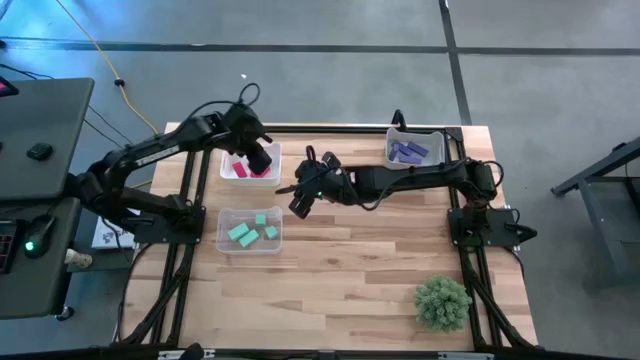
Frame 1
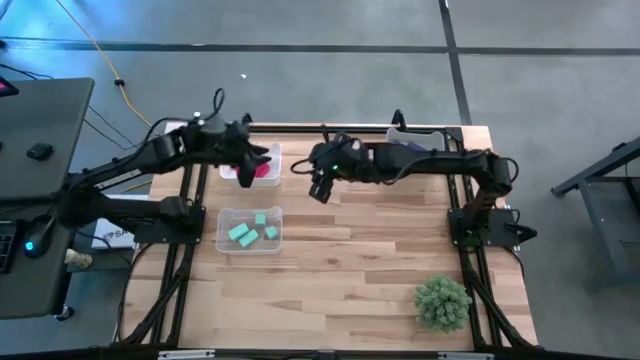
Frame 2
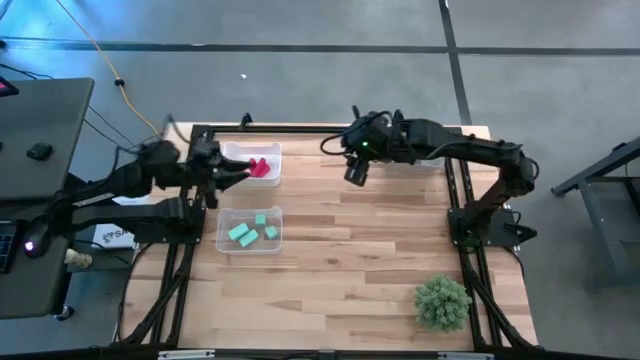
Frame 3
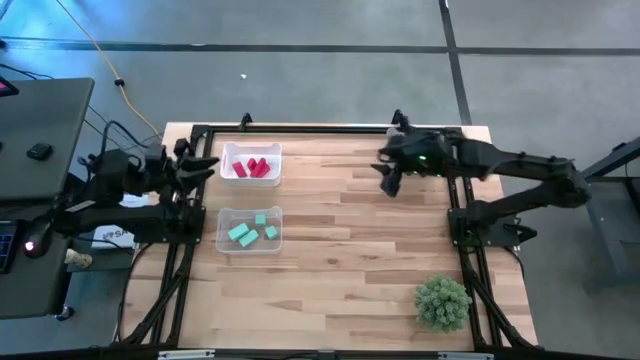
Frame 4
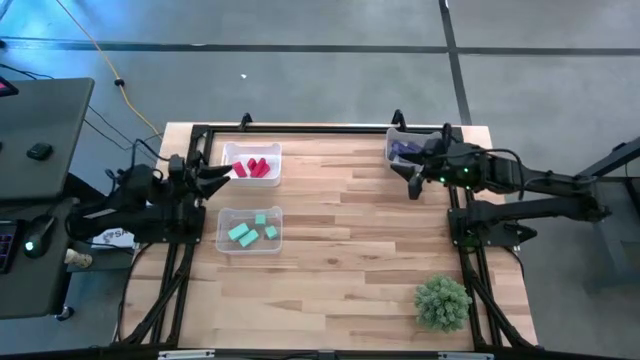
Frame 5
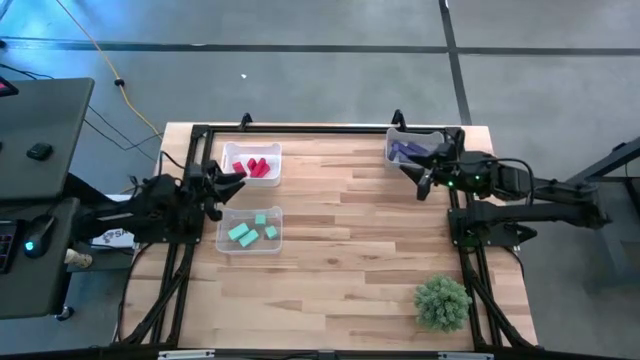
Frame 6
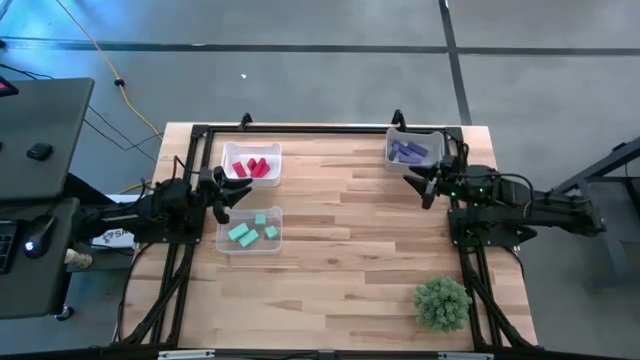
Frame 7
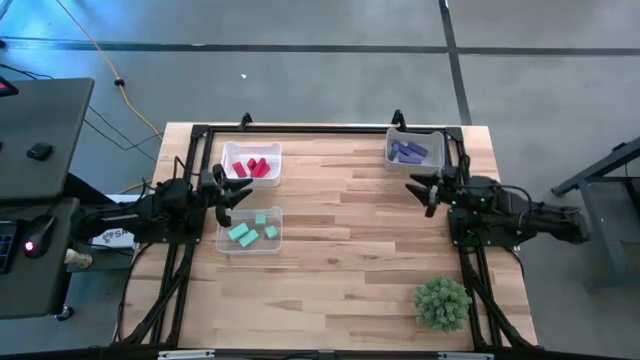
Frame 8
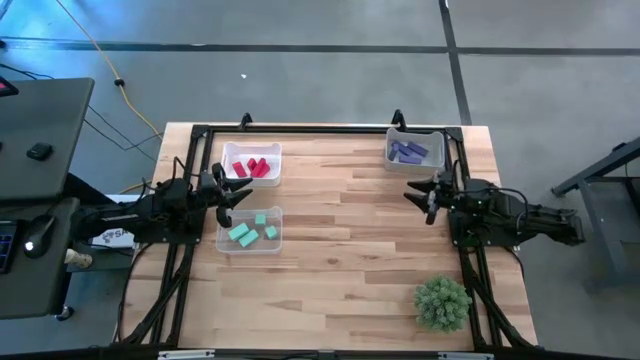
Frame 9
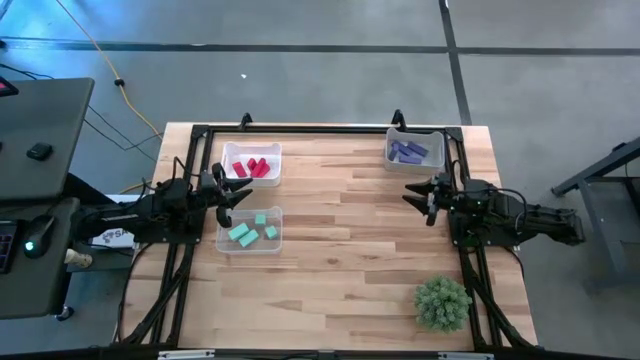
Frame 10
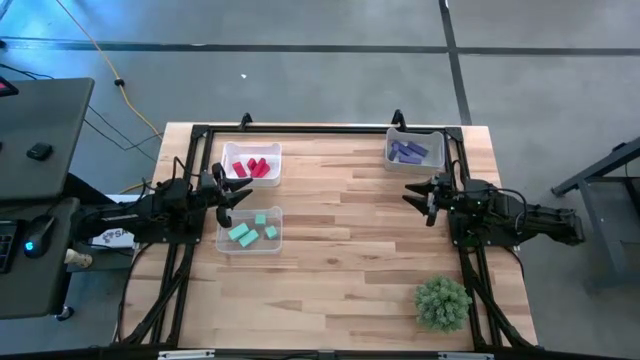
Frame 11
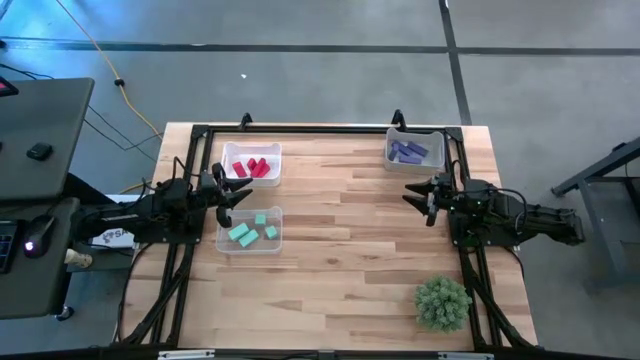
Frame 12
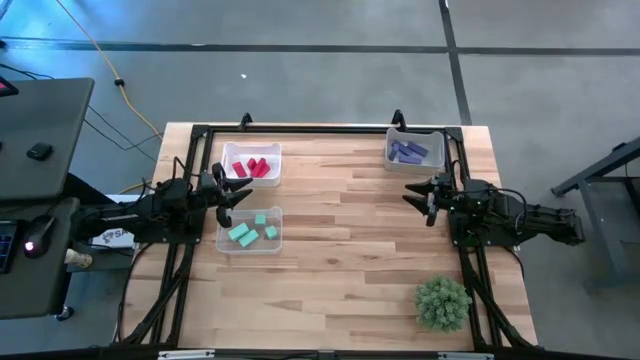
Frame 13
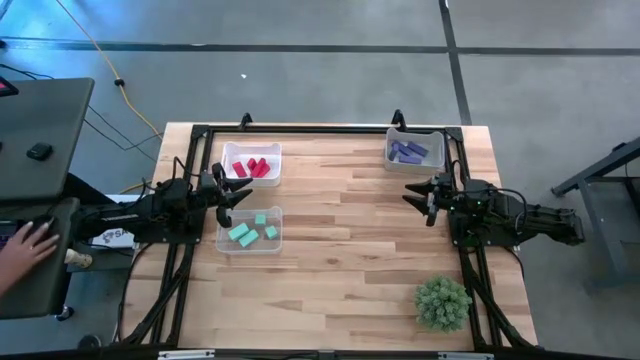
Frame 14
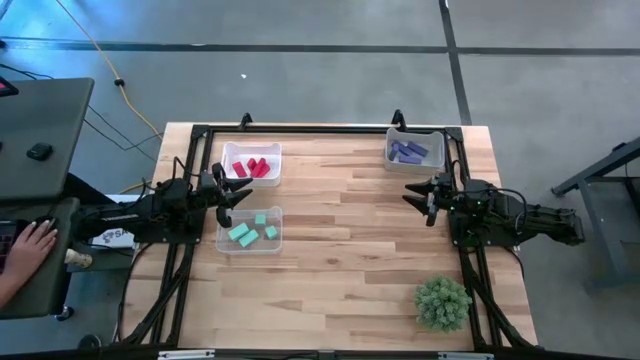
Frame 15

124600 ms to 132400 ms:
Task: Sort & place blocks by color
Return to Home Position

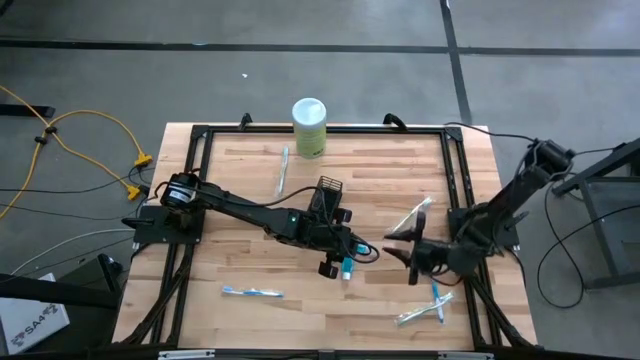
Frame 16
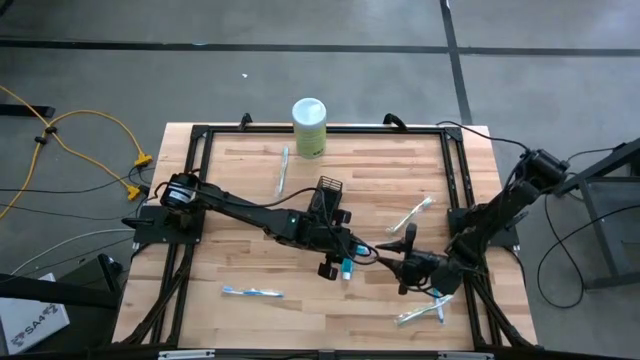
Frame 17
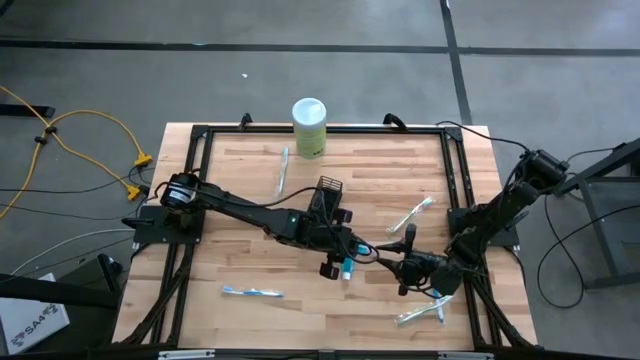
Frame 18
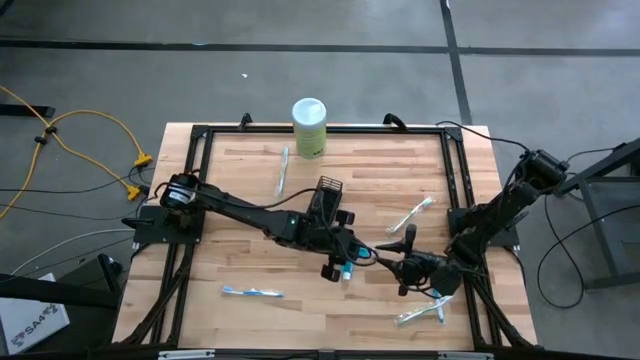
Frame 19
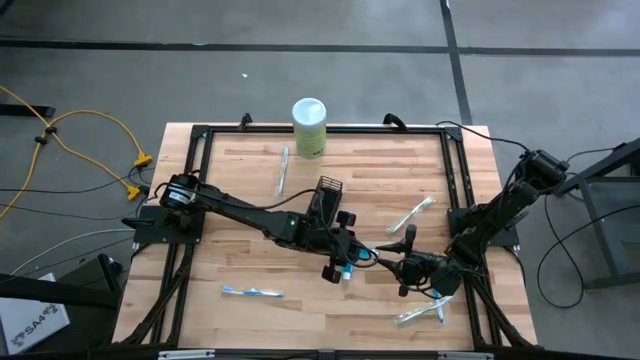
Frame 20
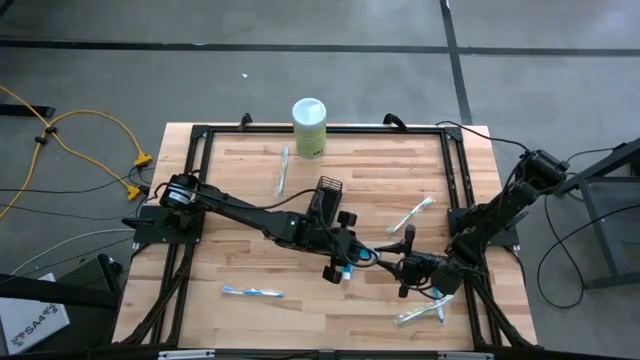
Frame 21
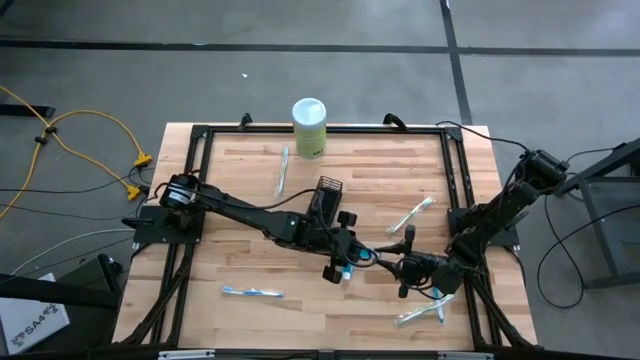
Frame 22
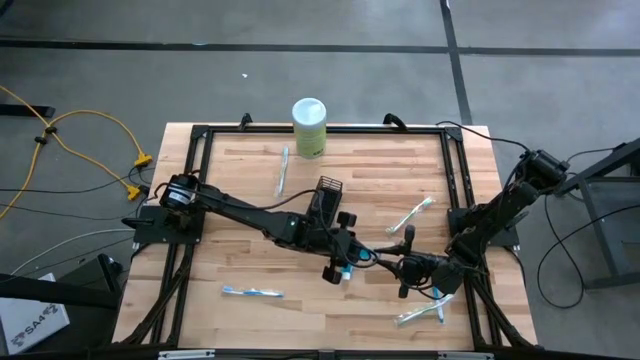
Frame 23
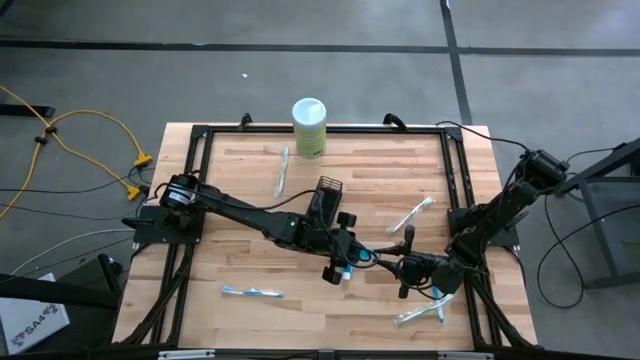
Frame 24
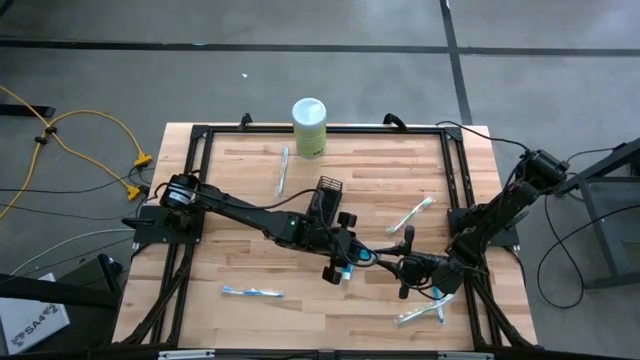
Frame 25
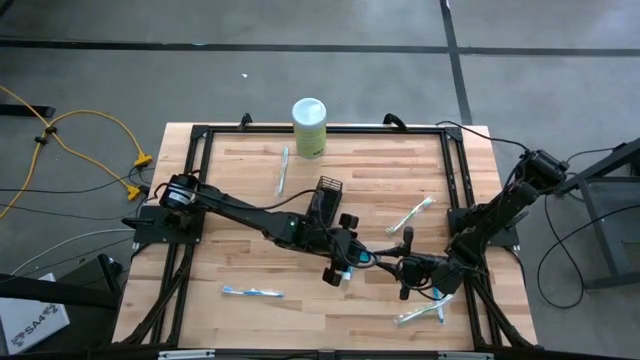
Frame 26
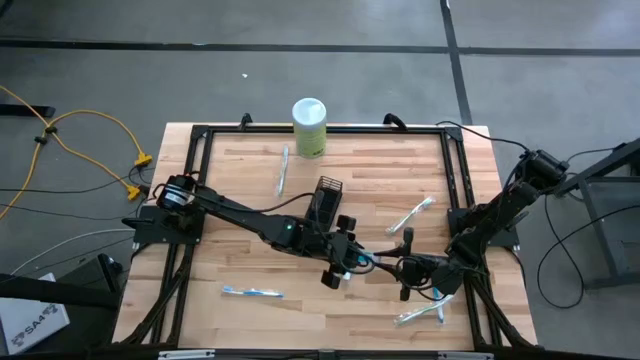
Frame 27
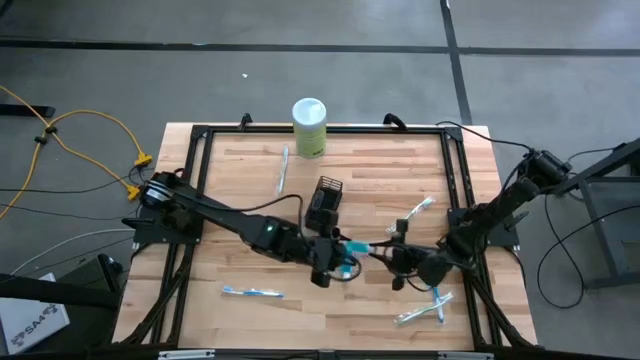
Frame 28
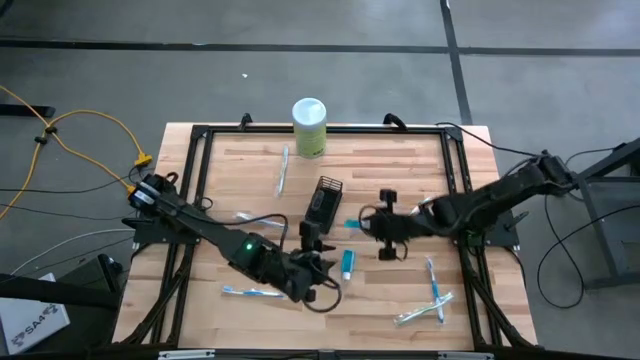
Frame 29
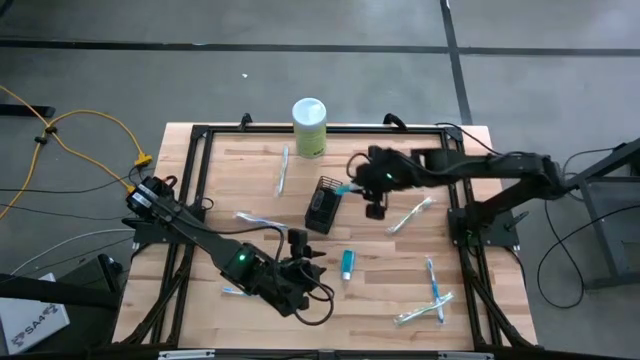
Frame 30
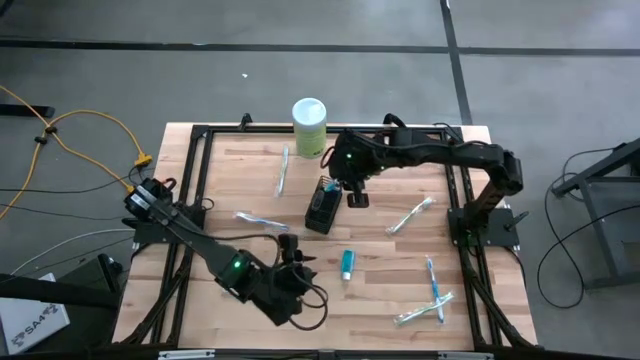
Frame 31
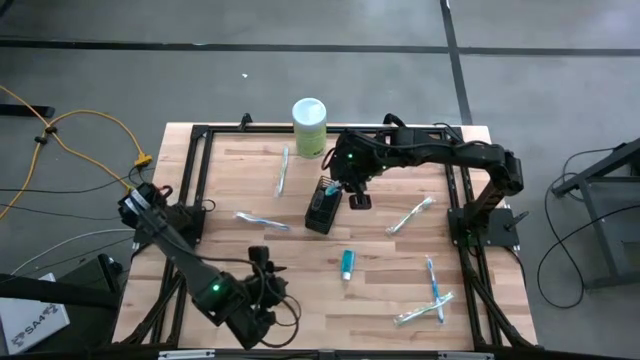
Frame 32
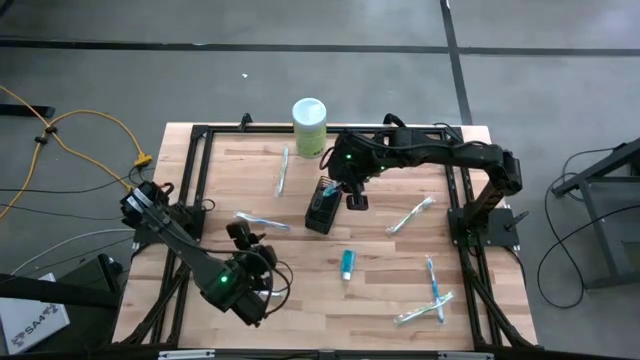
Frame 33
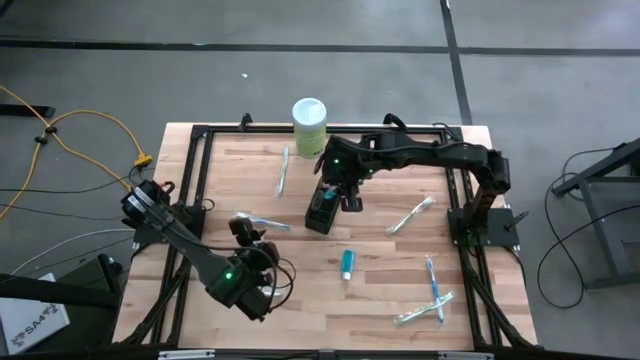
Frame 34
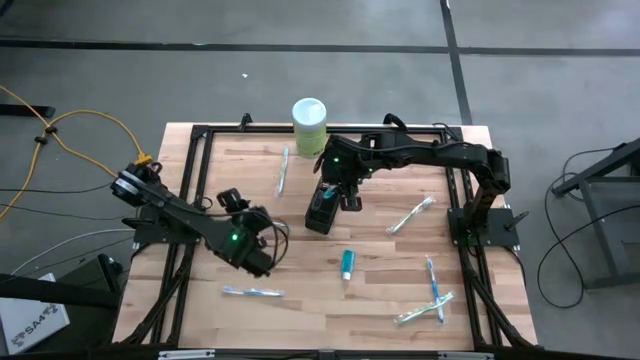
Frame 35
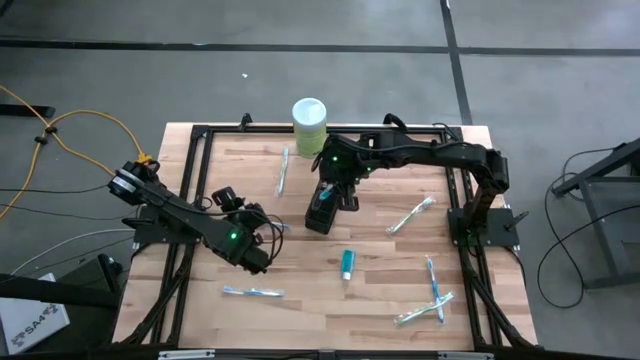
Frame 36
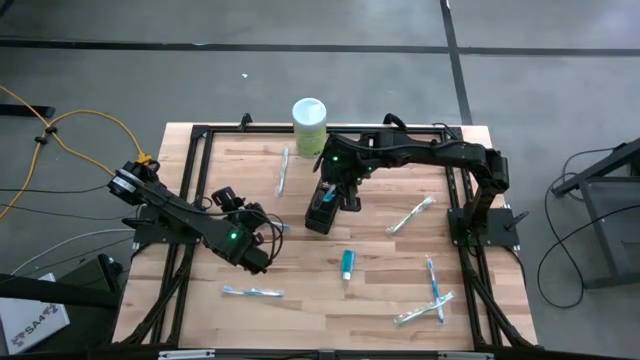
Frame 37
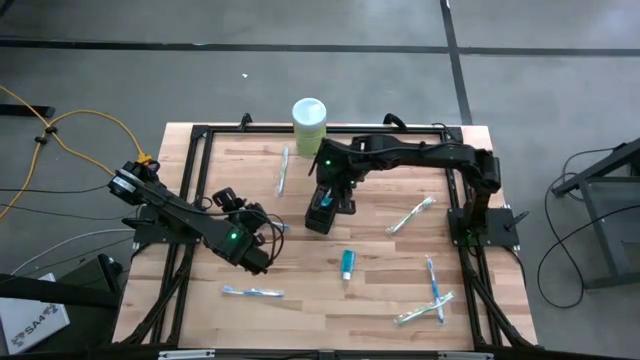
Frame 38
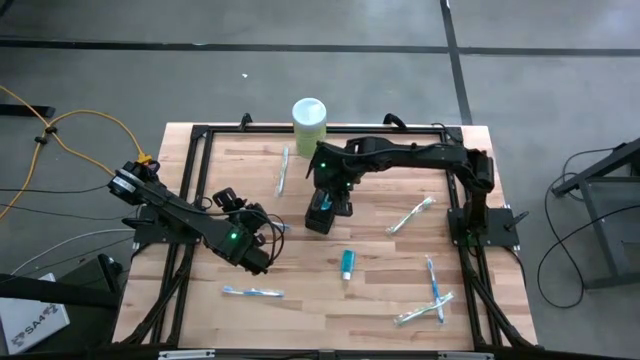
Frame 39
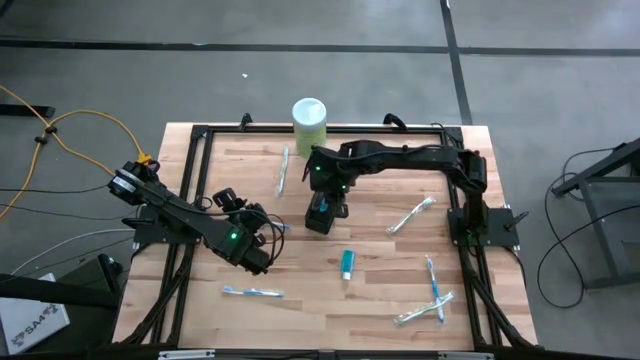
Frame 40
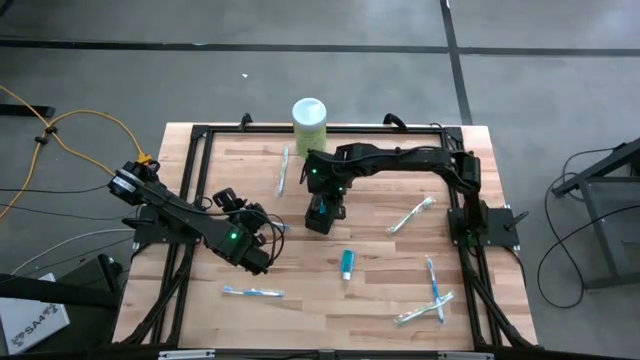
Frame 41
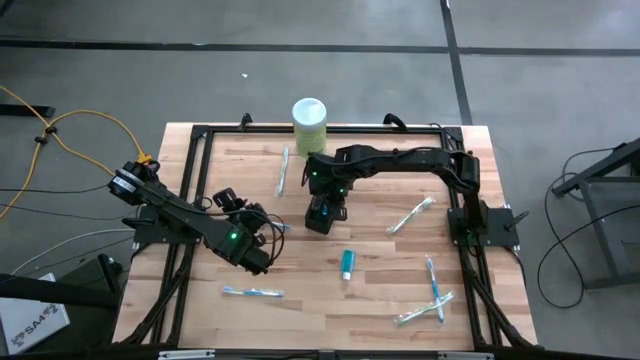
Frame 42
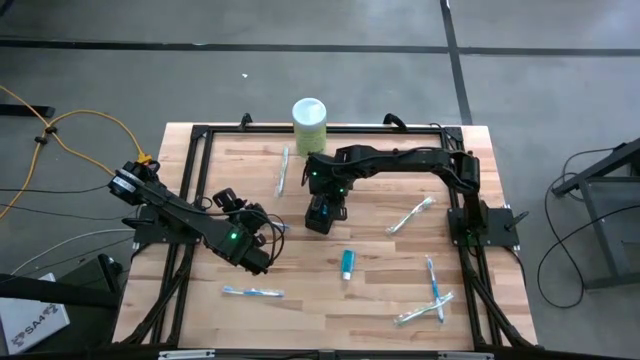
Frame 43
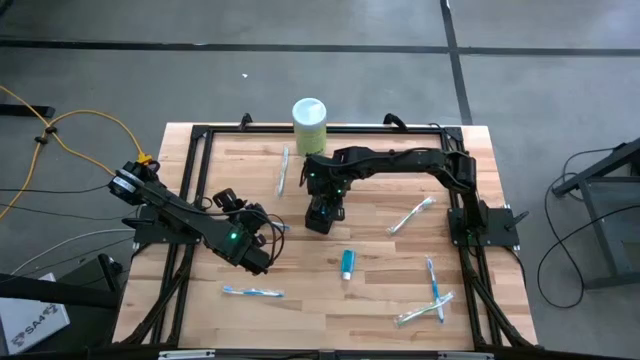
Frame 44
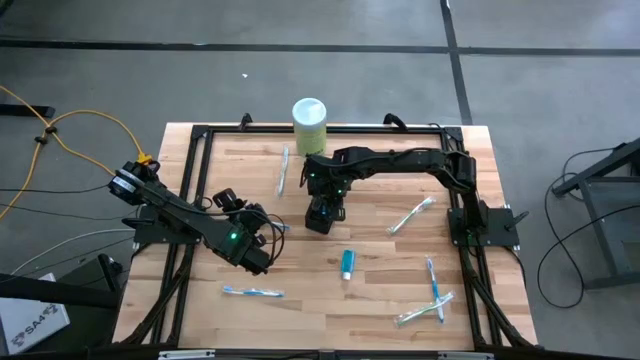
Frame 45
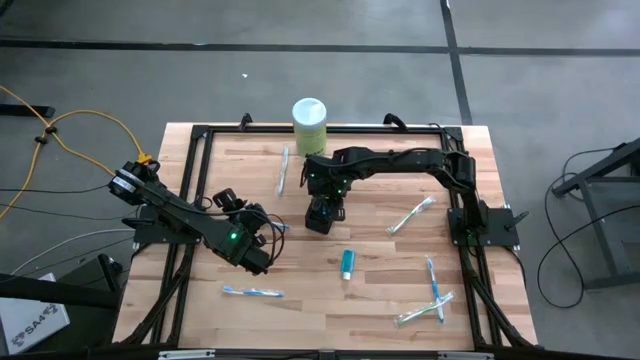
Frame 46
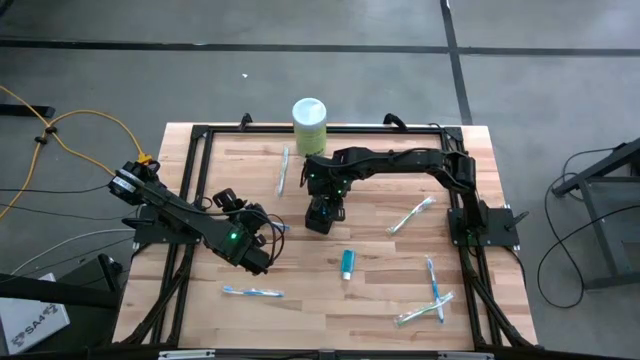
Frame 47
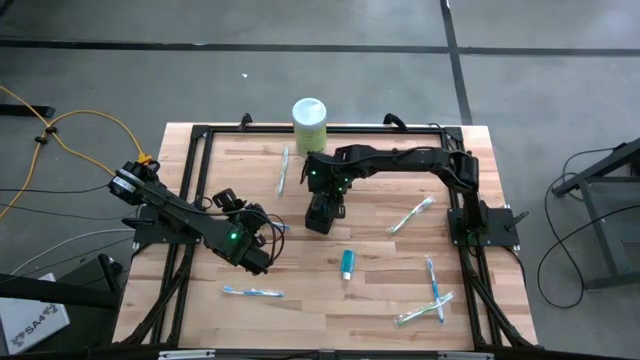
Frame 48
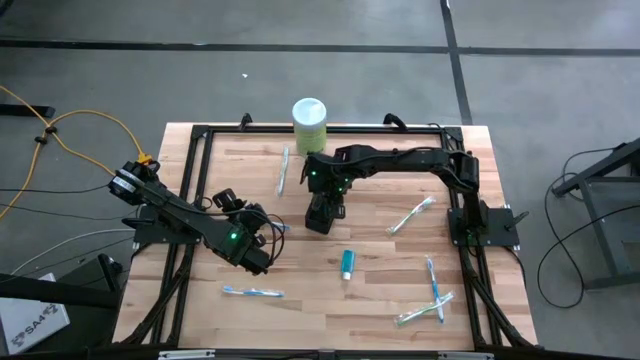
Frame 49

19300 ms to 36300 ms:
Task: Pick & Place toothbrushing station
Put the right blue mouthwash into the middle section of the black wire organizer
